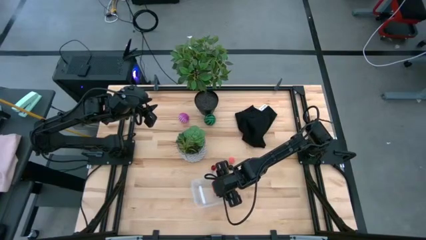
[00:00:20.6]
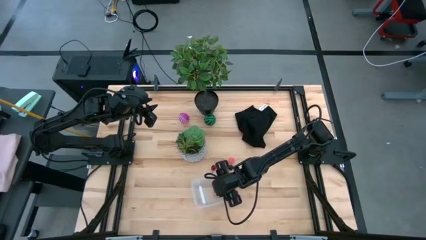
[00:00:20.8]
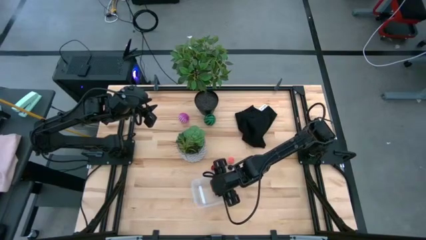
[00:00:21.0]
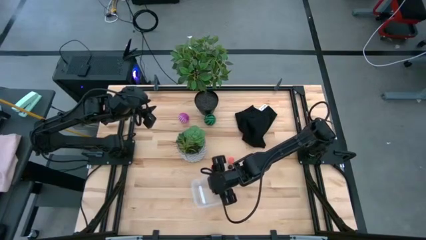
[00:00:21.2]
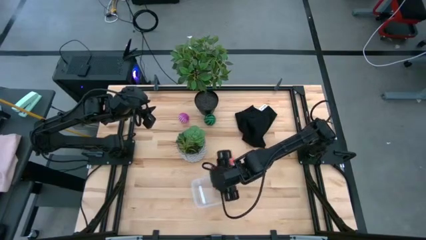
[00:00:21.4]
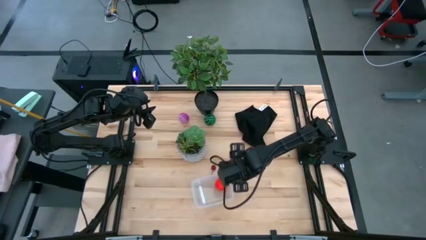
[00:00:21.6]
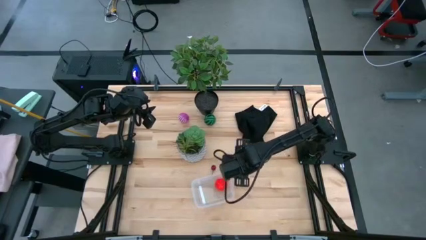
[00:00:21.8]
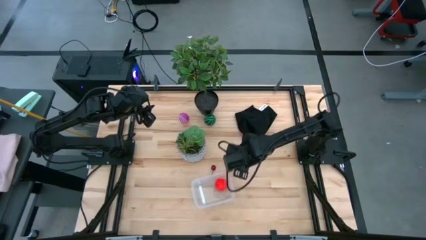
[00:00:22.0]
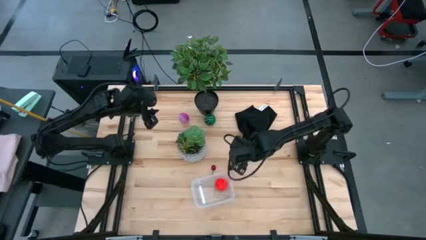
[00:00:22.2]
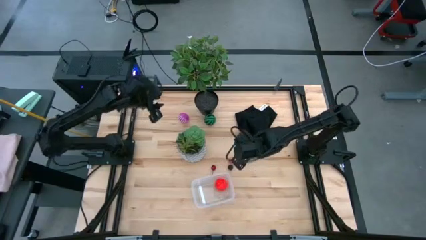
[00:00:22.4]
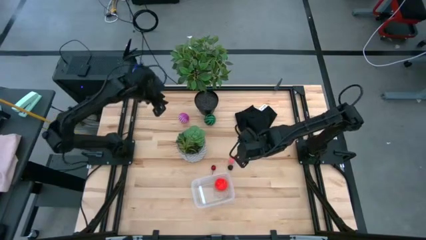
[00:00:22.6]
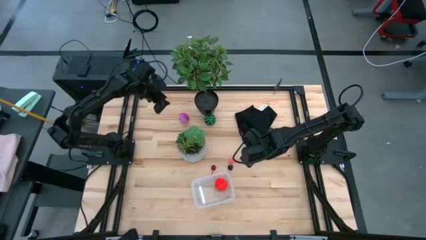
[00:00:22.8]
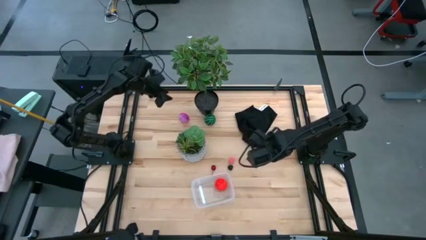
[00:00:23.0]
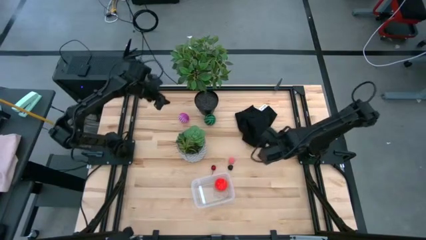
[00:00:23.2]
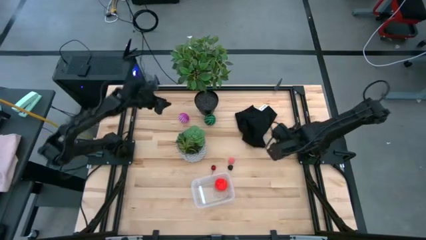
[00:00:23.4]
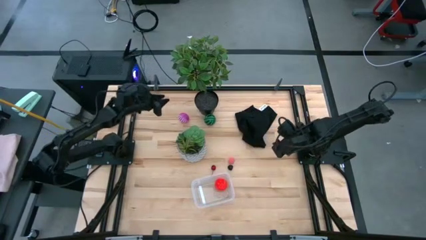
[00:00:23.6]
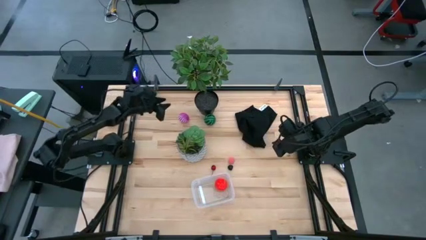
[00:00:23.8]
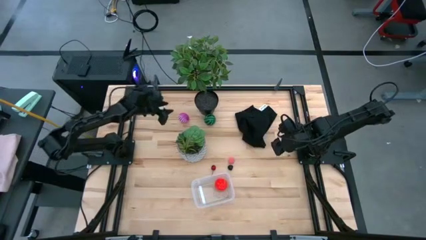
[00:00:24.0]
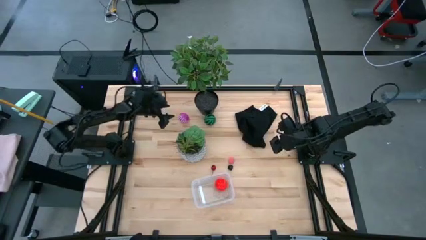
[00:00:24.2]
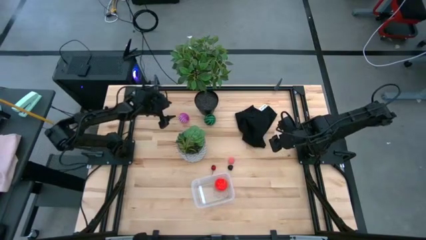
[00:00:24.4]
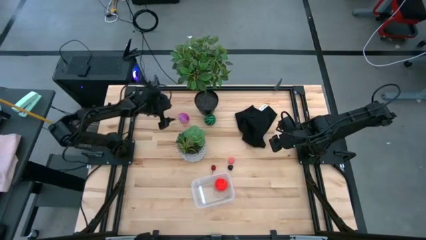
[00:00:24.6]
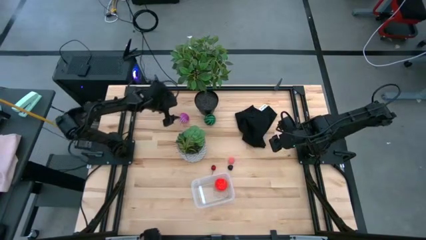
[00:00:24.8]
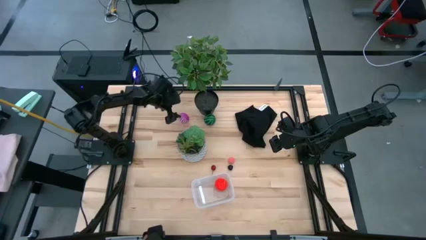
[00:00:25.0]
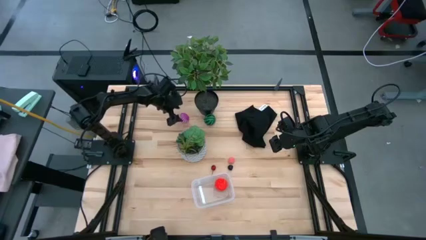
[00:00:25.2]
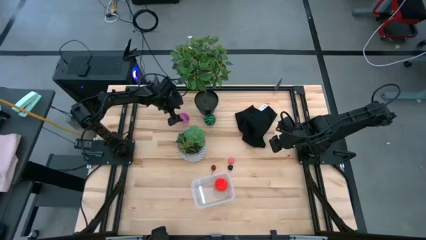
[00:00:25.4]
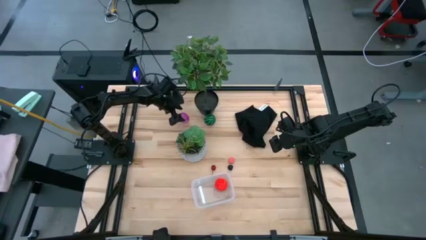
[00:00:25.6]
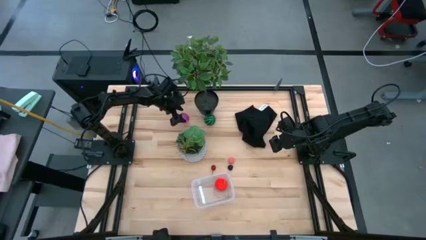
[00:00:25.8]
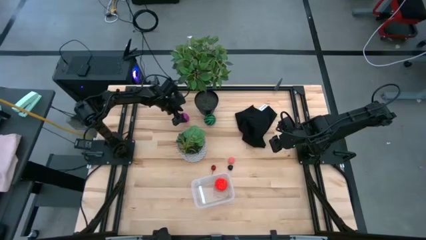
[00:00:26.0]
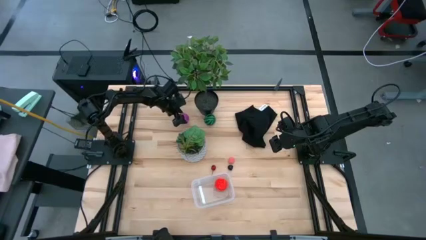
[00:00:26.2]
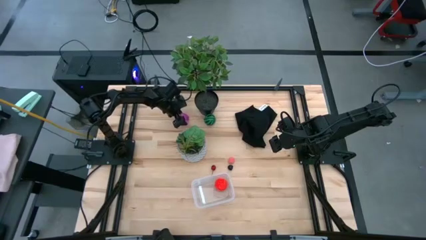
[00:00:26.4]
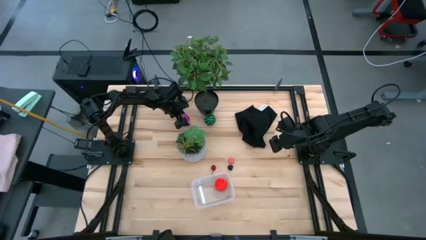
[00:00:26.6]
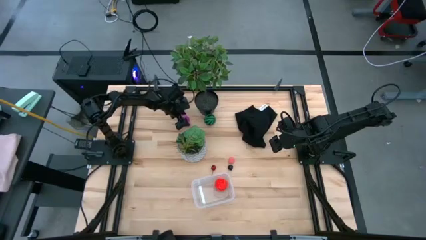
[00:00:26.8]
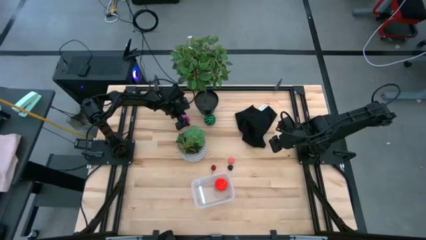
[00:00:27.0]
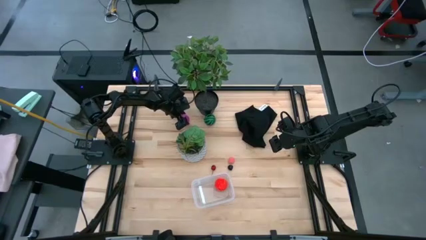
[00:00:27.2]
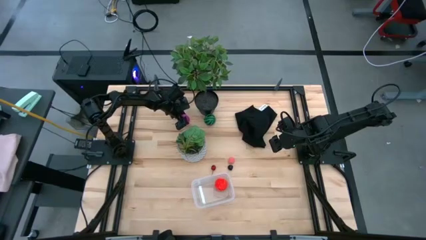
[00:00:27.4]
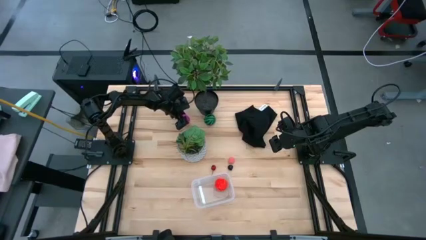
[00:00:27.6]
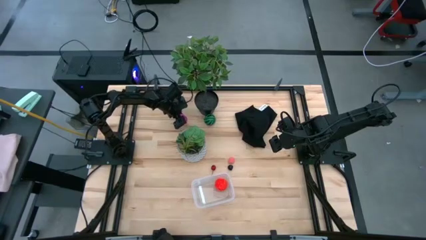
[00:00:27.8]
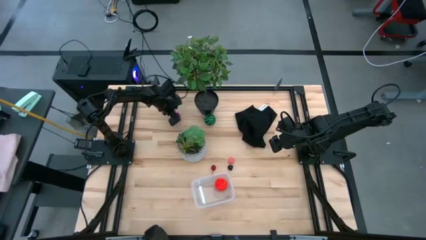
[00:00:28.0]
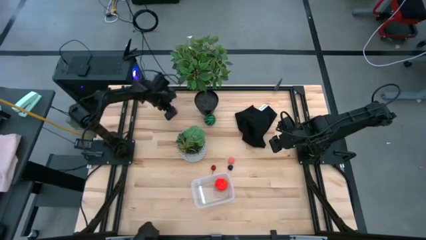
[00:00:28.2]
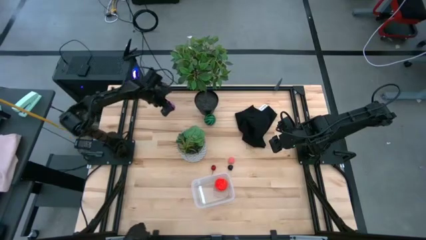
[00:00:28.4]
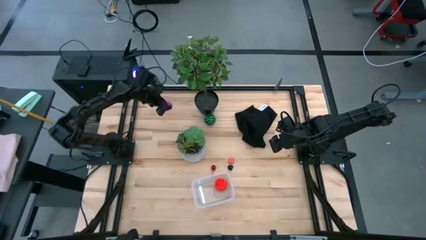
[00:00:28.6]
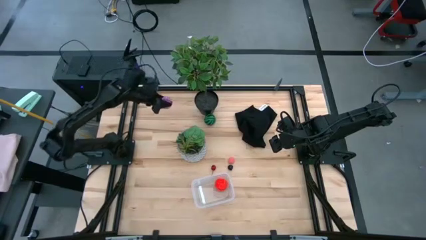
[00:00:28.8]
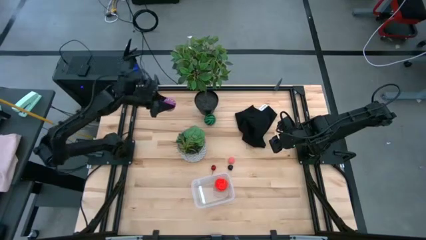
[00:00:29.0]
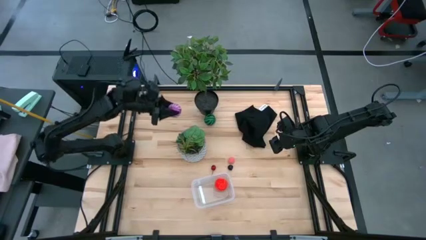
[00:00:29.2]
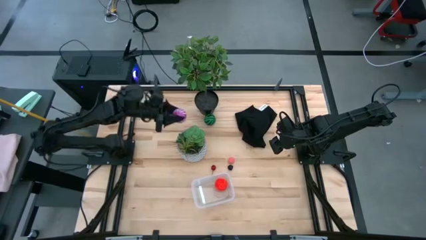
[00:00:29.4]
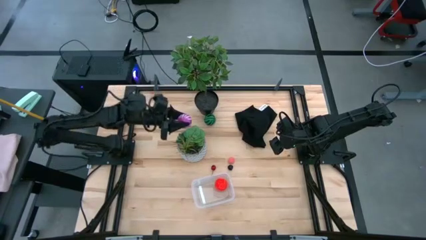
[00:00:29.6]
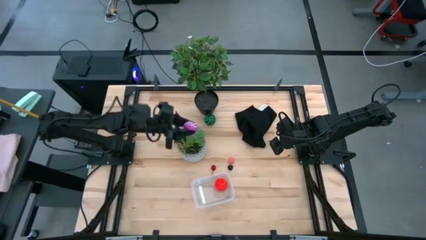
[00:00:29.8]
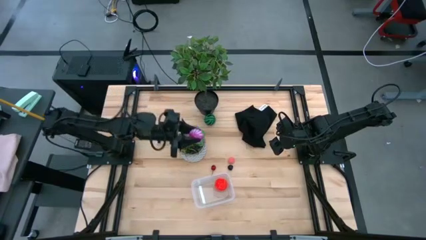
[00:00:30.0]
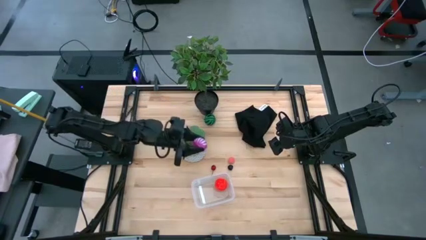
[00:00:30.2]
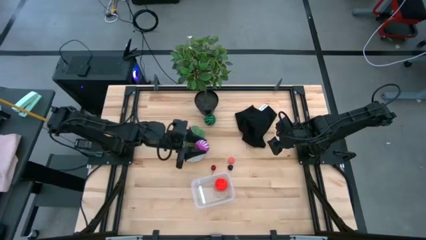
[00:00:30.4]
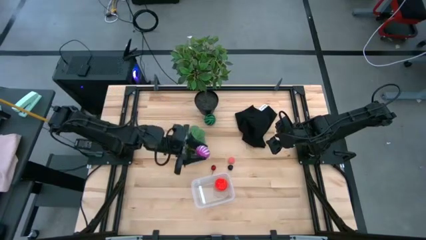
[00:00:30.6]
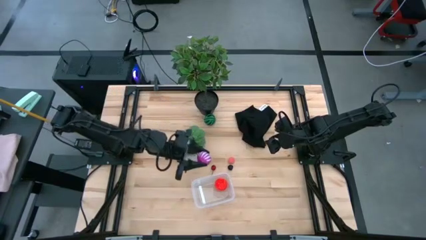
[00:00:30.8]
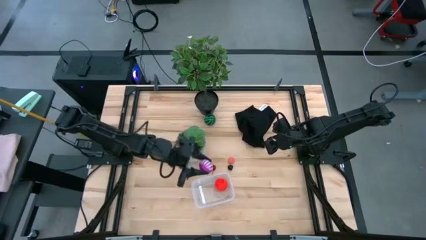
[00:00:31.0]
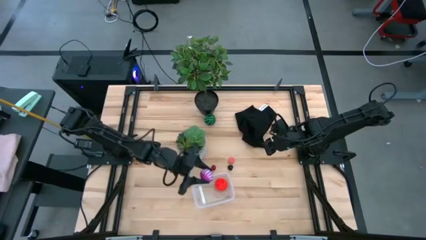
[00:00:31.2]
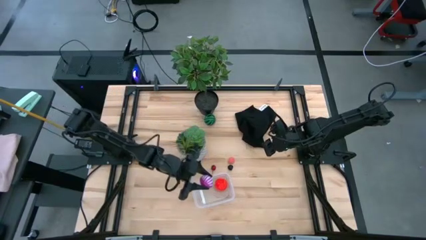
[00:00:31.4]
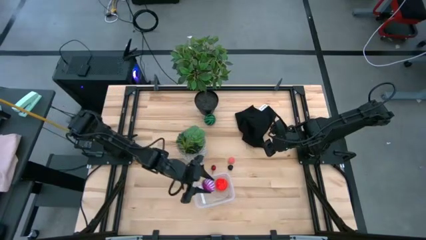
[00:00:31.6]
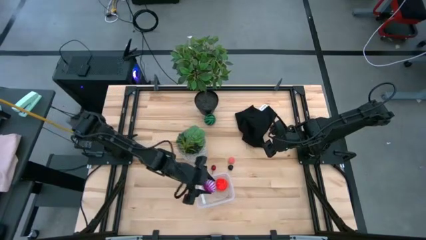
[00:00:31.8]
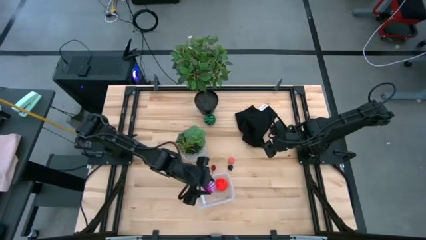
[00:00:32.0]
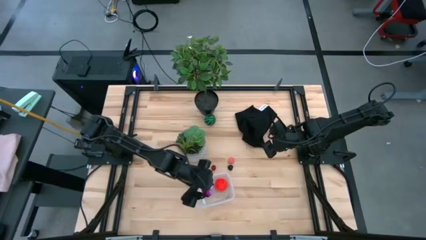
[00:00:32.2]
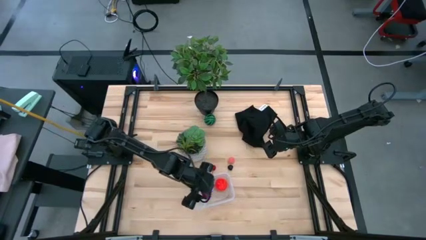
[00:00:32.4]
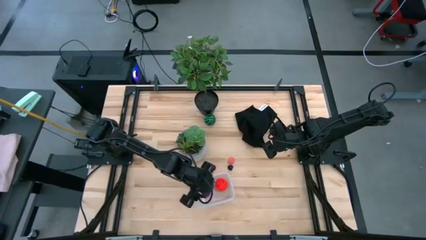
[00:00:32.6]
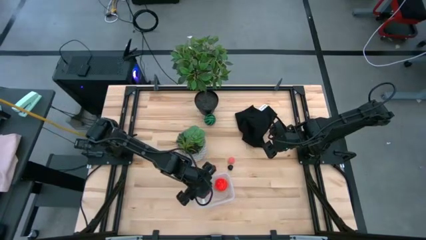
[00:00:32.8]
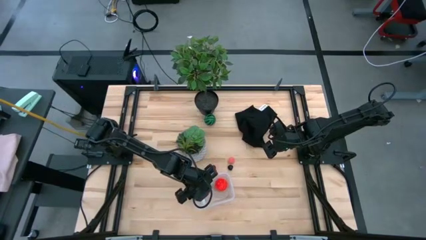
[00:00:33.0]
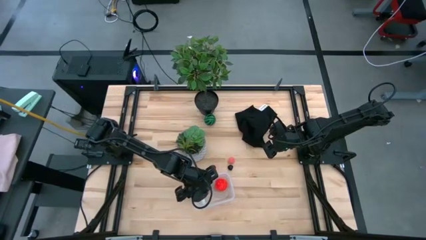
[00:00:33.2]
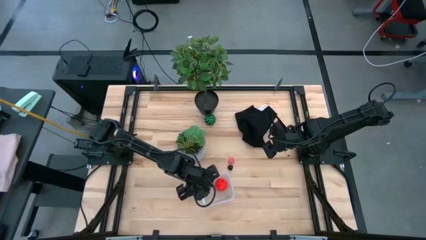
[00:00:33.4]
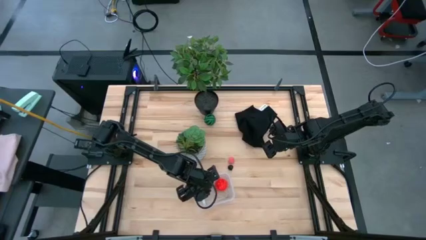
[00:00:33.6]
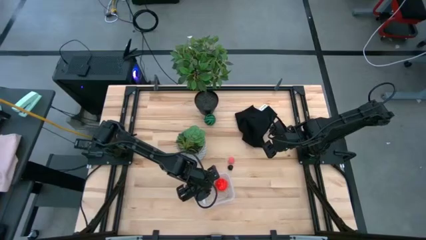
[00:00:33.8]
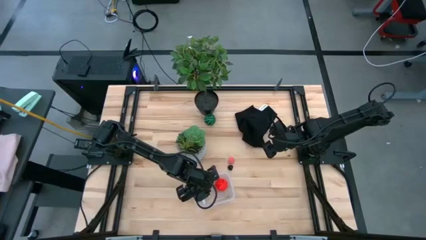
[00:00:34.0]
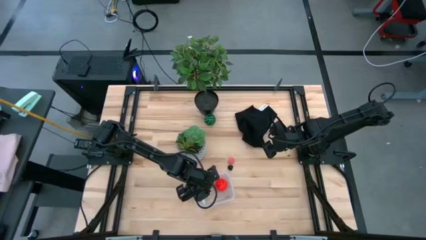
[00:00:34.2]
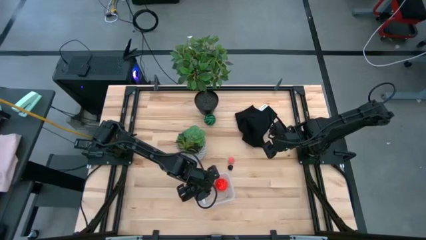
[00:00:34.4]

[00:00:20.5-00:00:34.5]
Task: Pick and placing Produce into tupperware
Put the onion into the transparent bin
